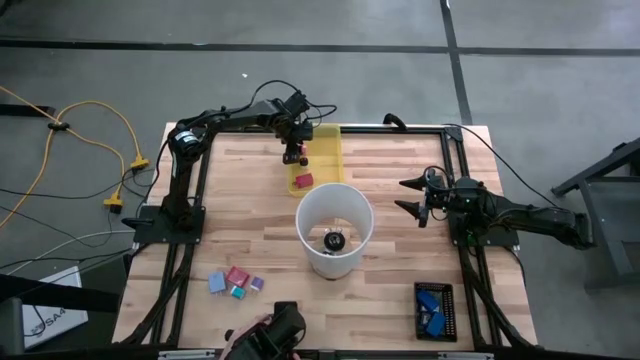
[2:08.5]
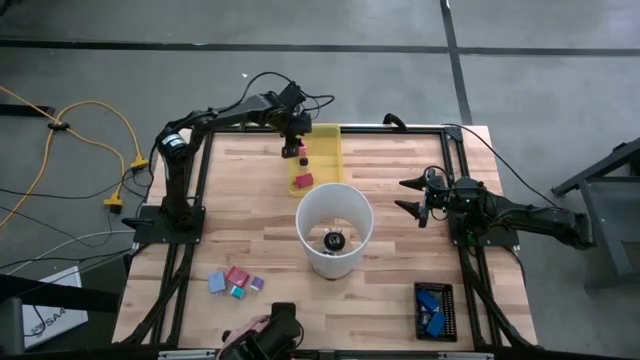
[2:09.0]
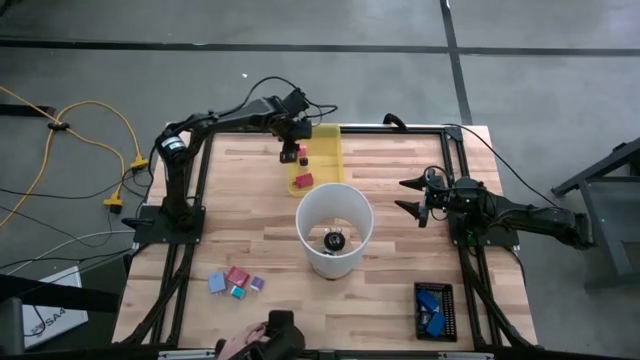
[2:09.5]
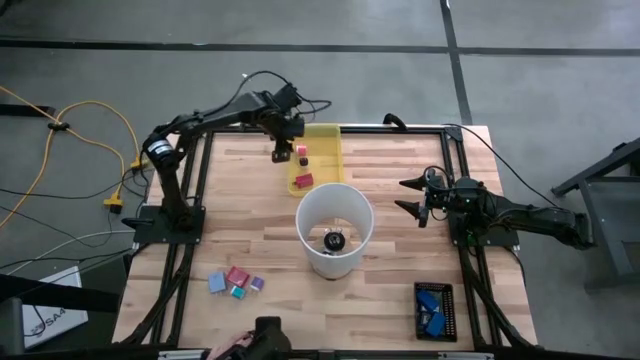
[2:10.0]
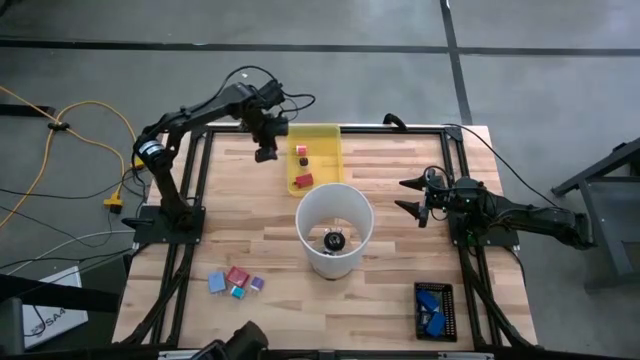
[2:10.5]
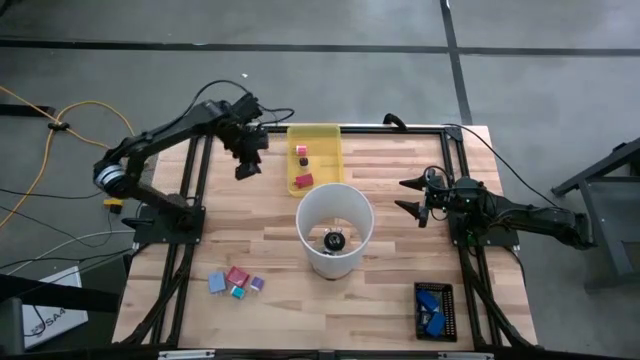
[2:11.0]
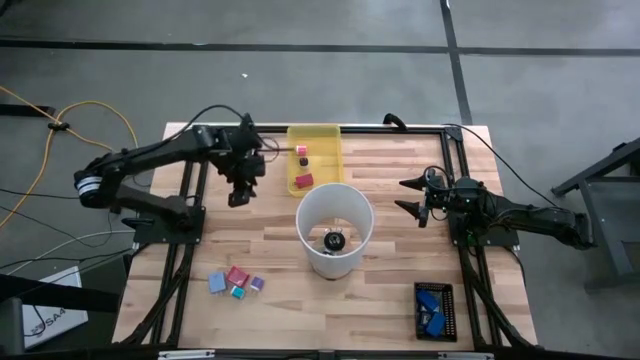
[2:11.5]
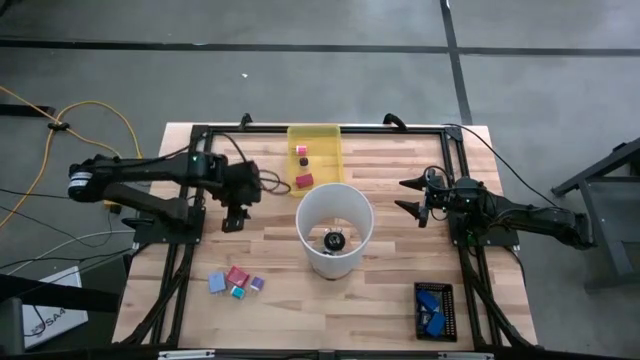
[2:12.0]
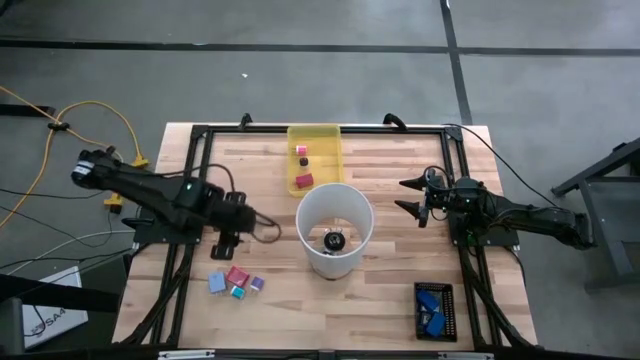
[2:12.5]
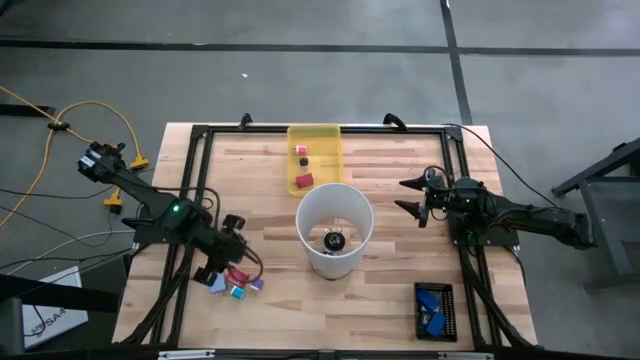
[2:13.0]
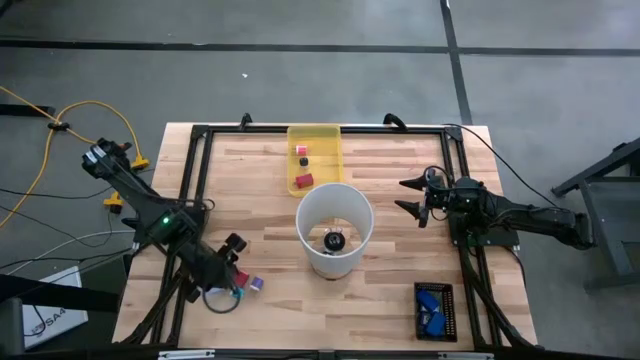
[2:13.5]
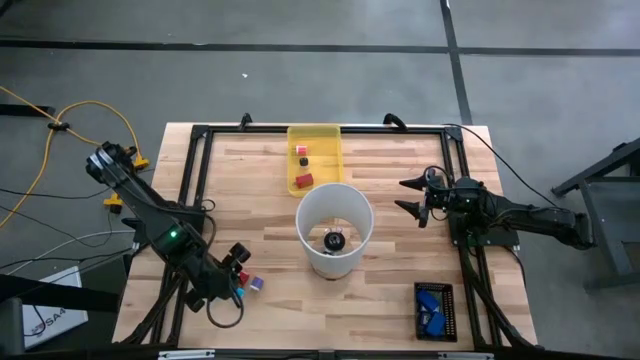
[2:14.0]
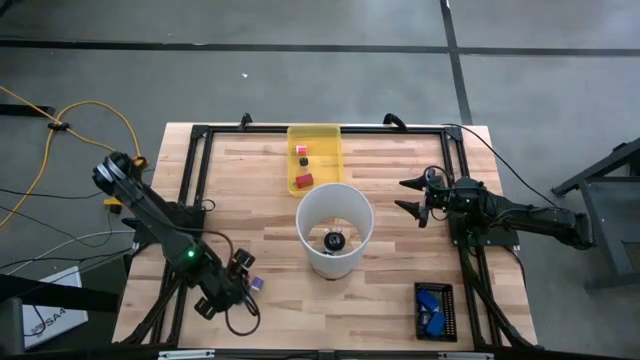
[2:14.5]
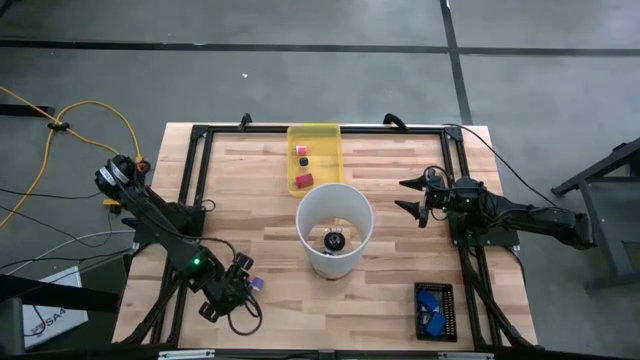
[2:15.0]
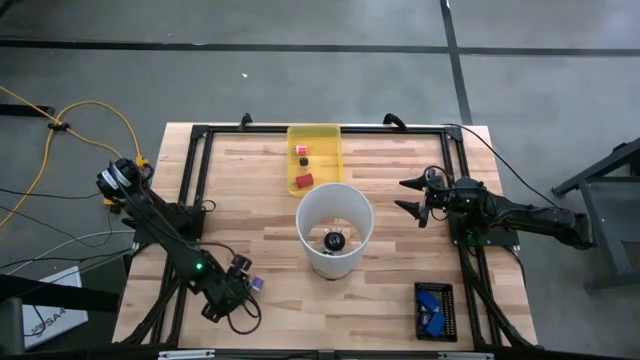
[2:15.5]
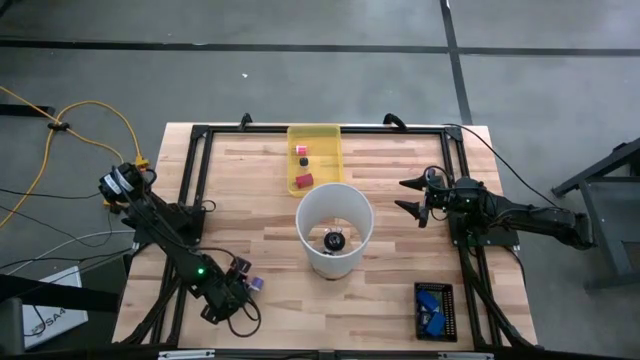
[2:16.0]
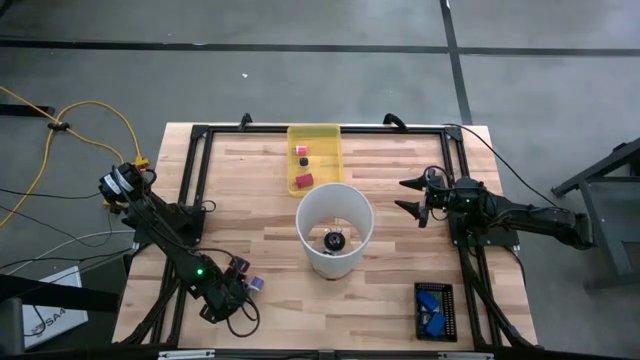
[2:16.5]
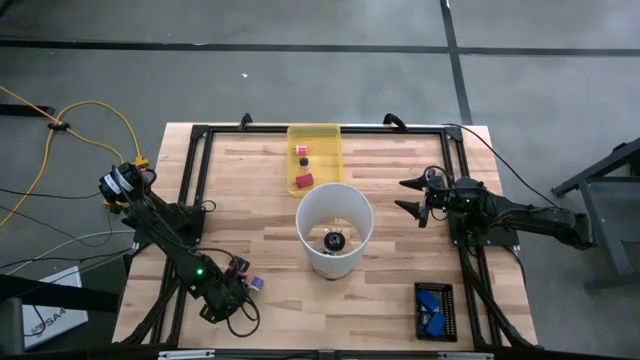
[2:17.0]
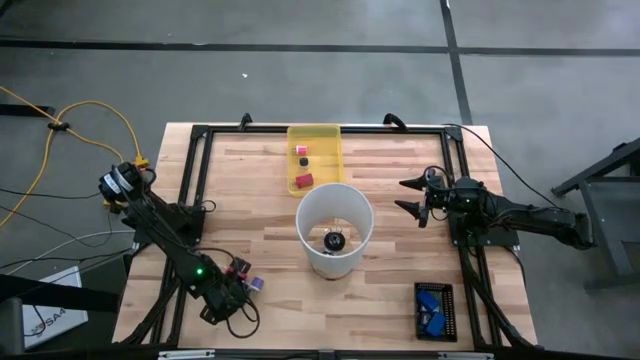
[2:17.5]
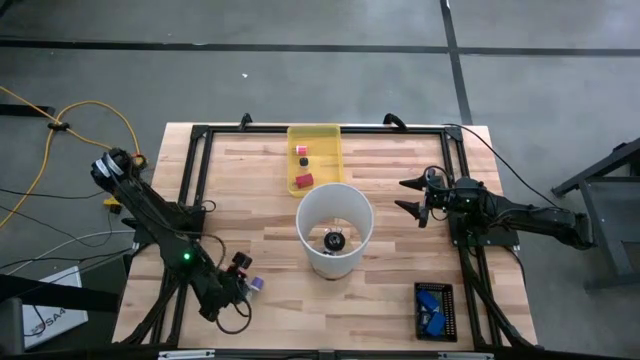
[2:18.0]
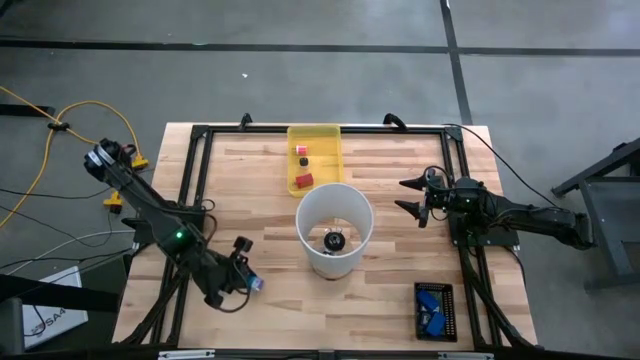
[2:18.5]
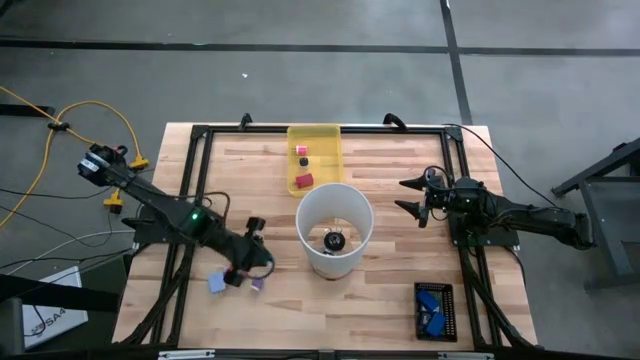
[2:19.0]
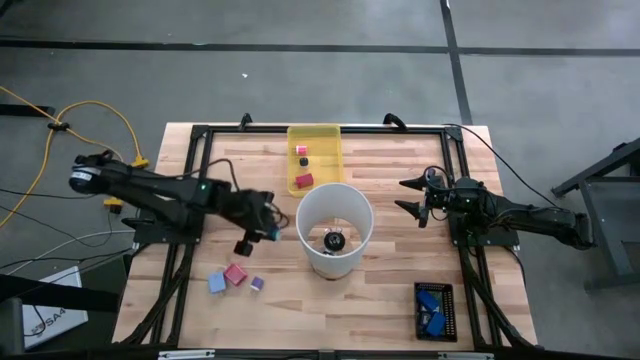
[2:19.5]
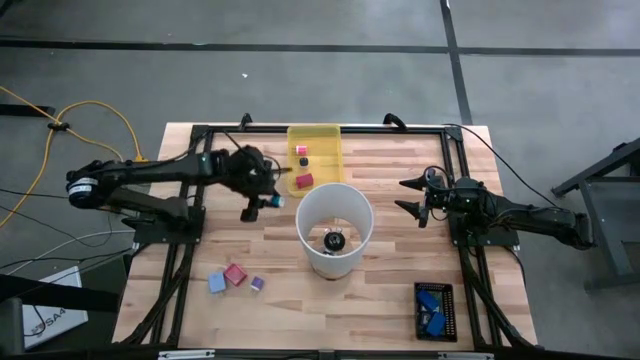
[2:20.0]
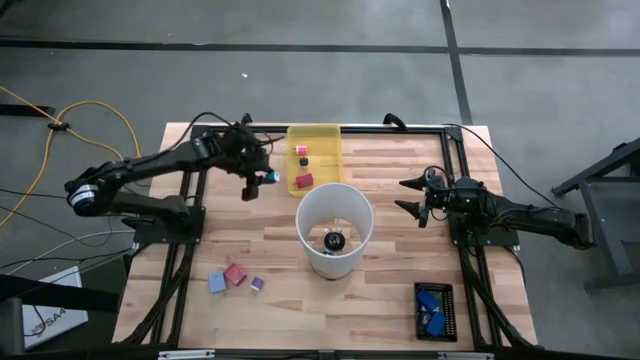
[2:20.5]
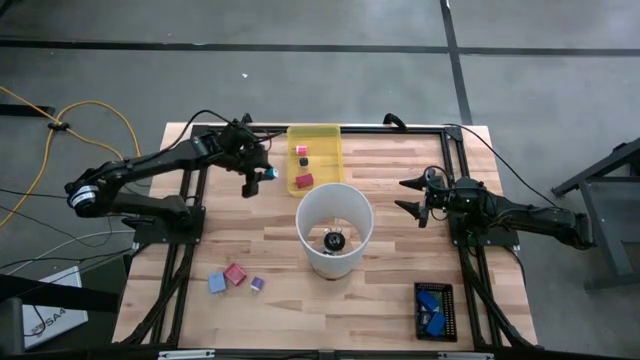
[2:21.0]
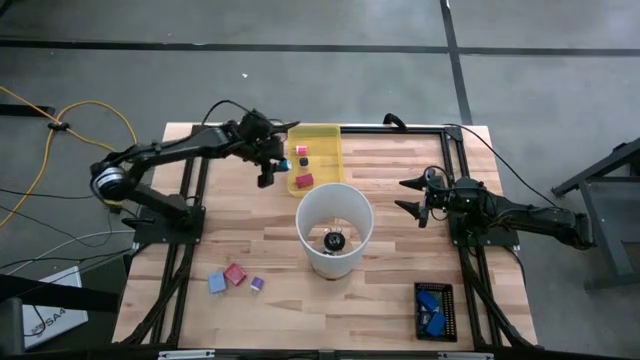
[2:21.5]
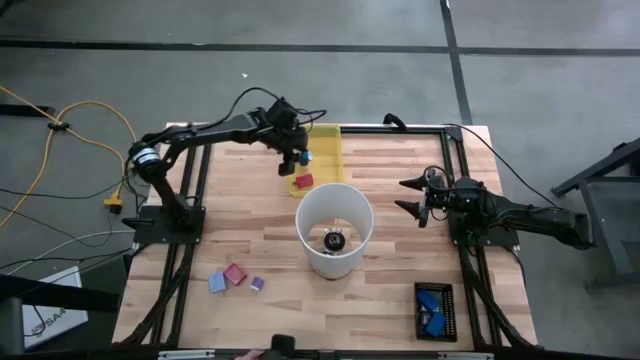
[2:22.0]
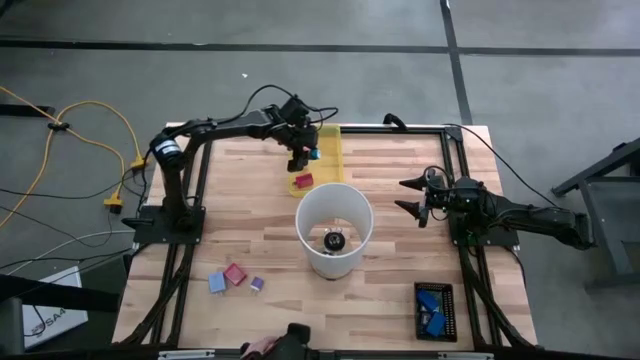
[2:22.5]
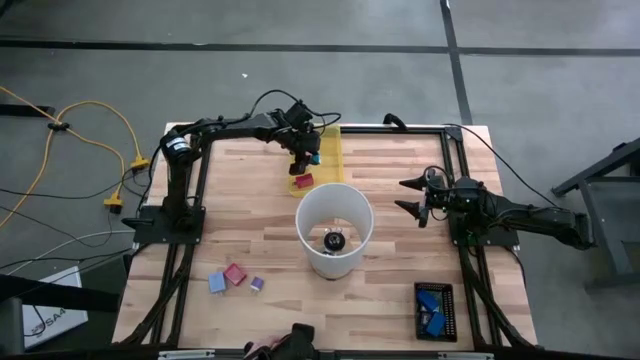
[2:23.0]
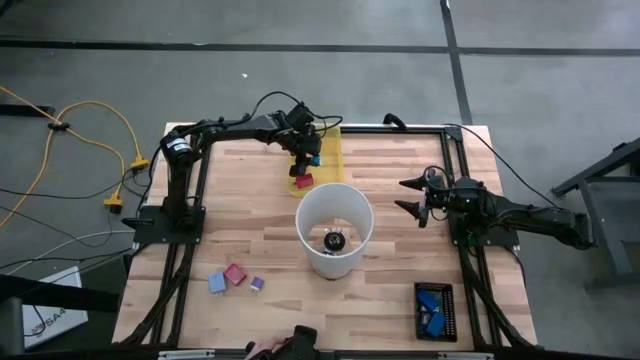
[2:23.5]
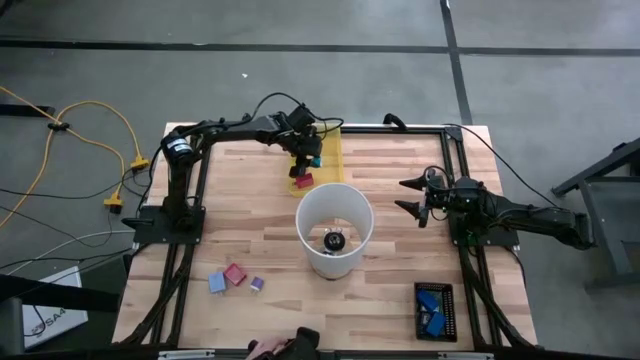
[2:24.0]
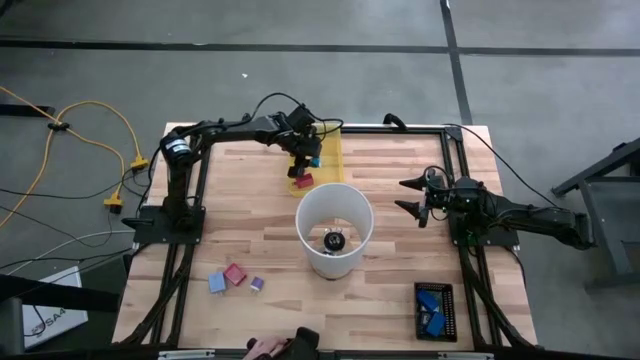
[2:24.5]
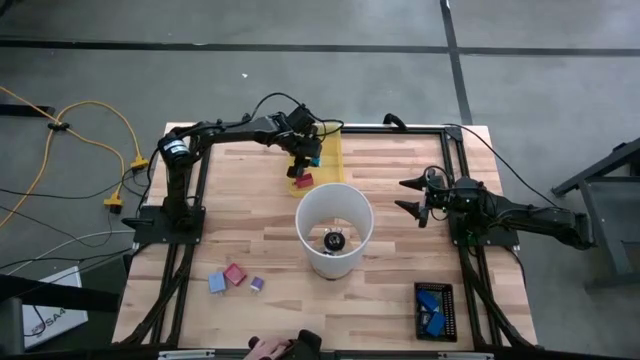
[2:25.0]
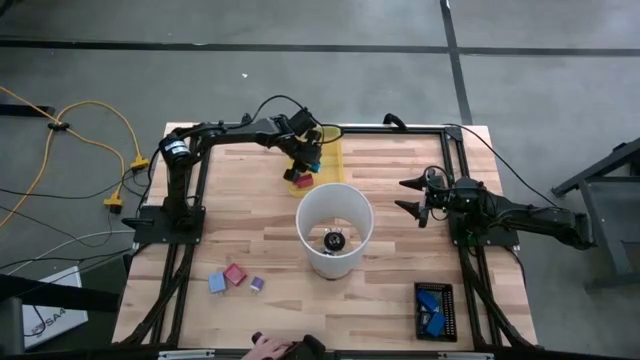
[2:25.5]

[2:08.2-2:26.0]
Task: Pick & Place Office items
Put the light blue charger adapter into the yellow bin
